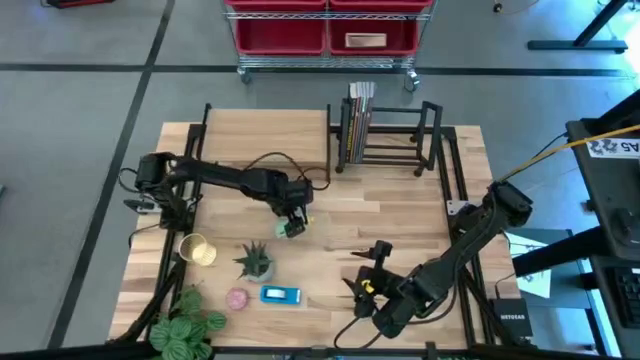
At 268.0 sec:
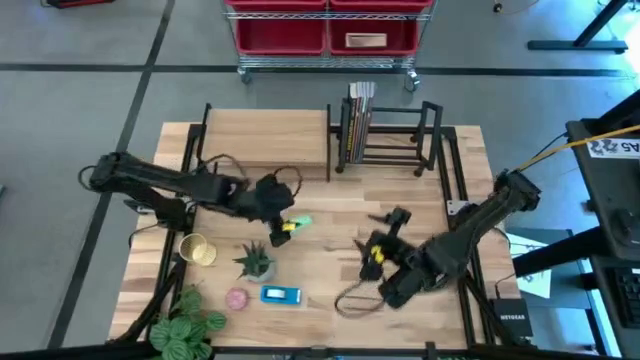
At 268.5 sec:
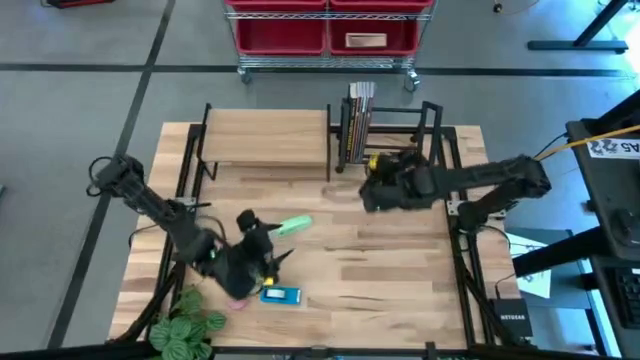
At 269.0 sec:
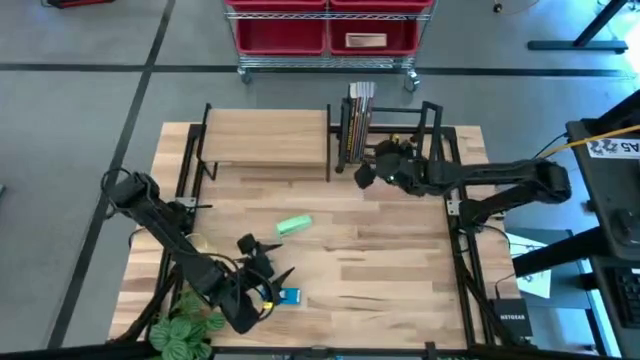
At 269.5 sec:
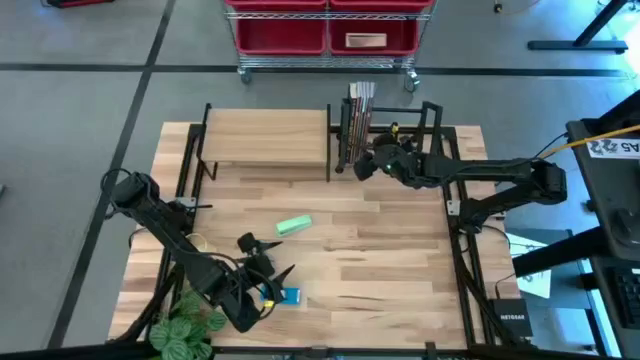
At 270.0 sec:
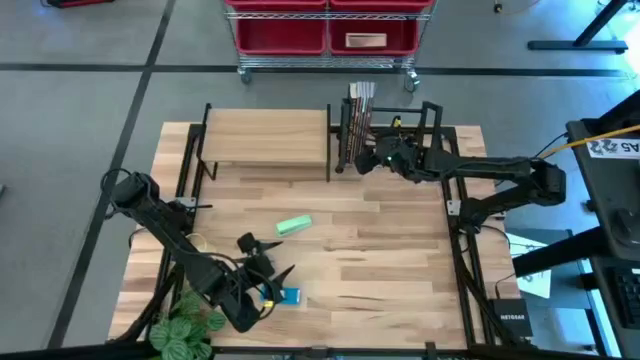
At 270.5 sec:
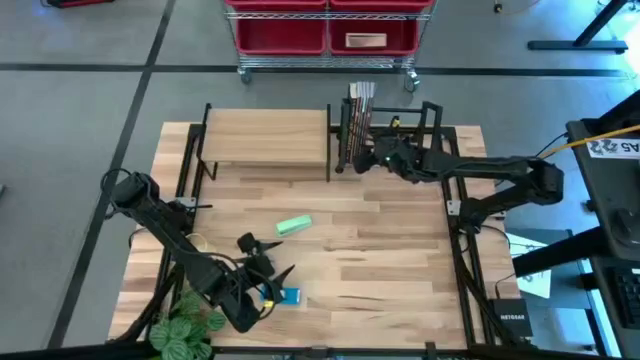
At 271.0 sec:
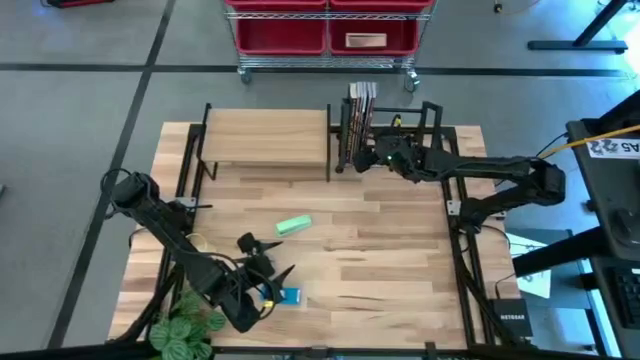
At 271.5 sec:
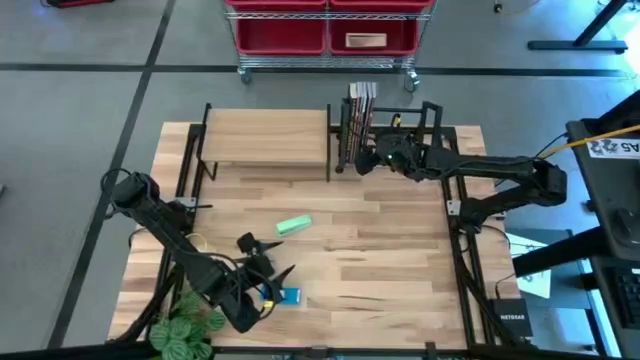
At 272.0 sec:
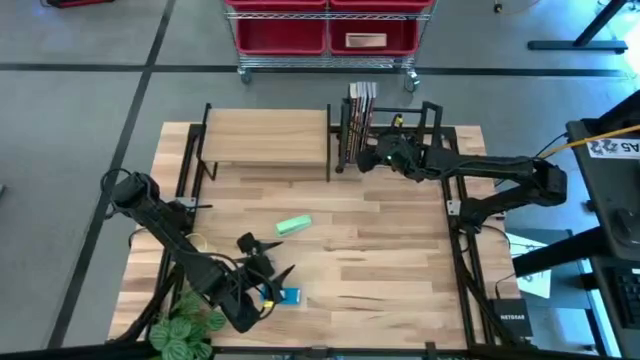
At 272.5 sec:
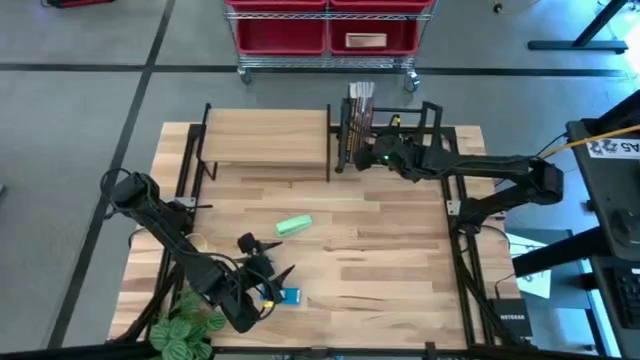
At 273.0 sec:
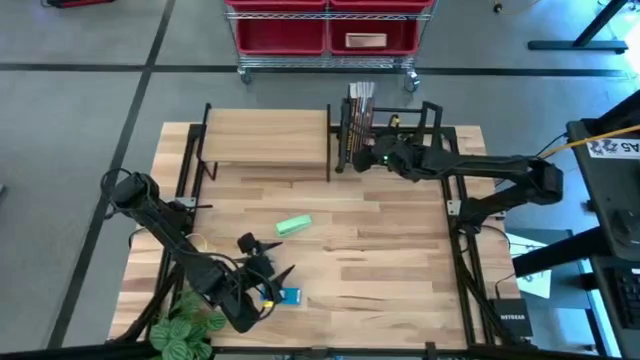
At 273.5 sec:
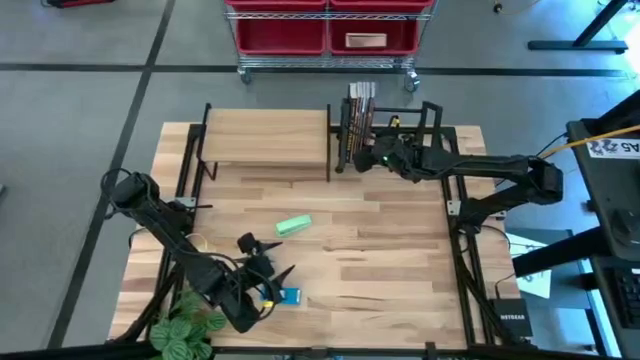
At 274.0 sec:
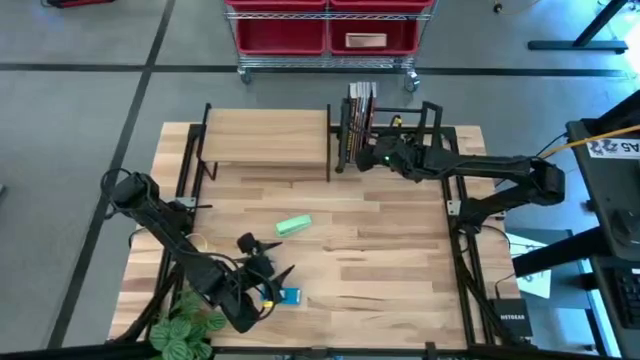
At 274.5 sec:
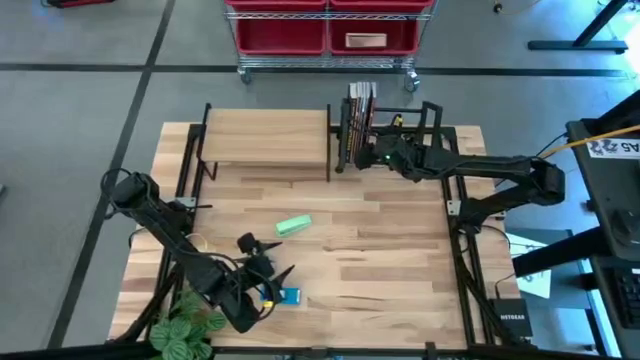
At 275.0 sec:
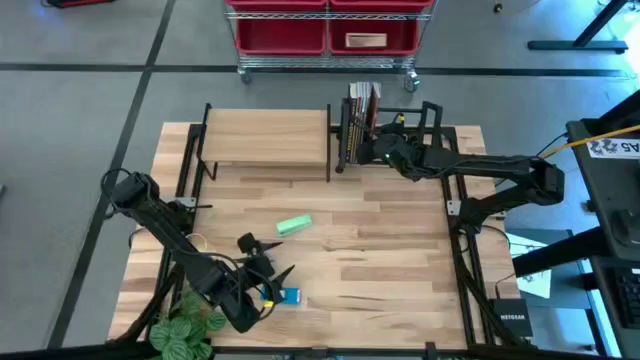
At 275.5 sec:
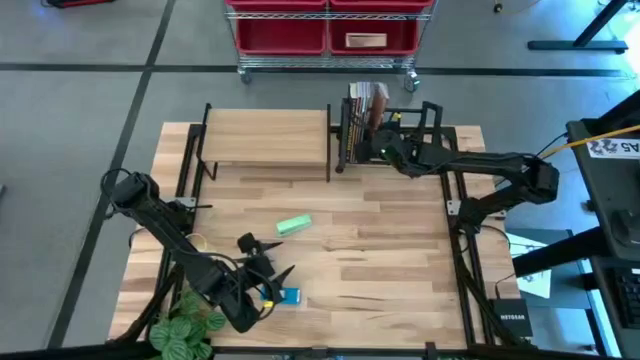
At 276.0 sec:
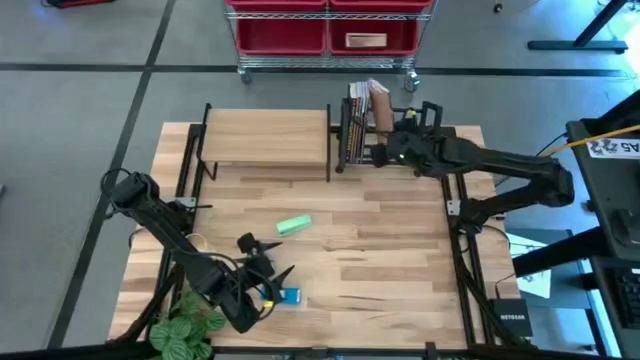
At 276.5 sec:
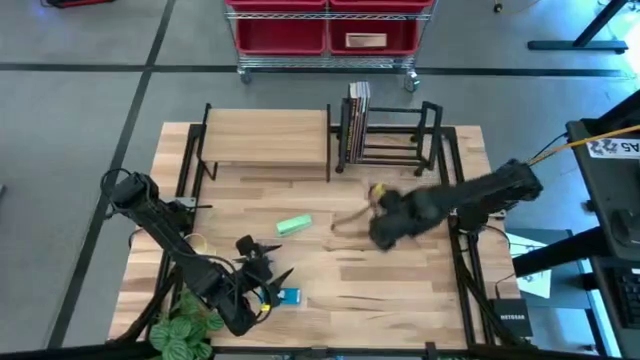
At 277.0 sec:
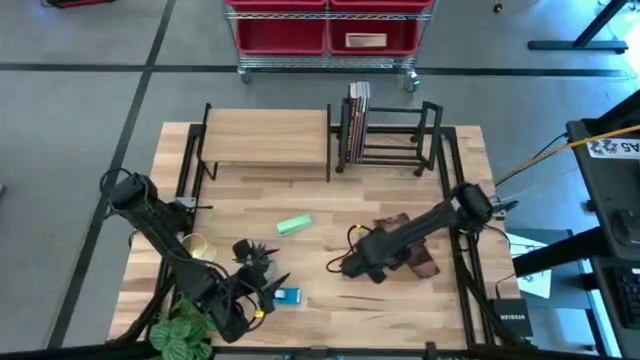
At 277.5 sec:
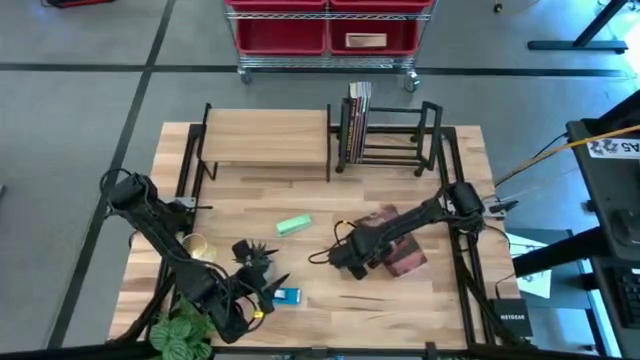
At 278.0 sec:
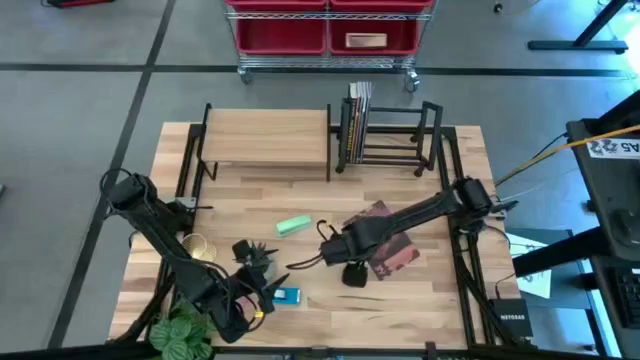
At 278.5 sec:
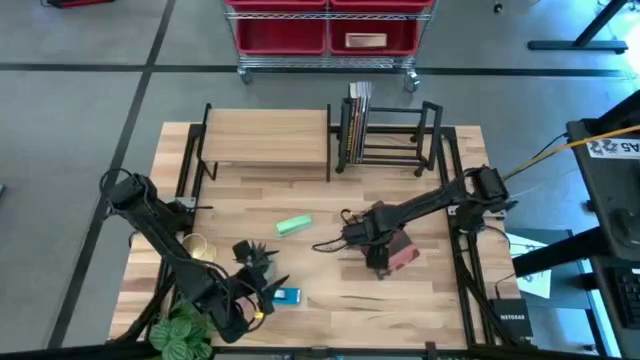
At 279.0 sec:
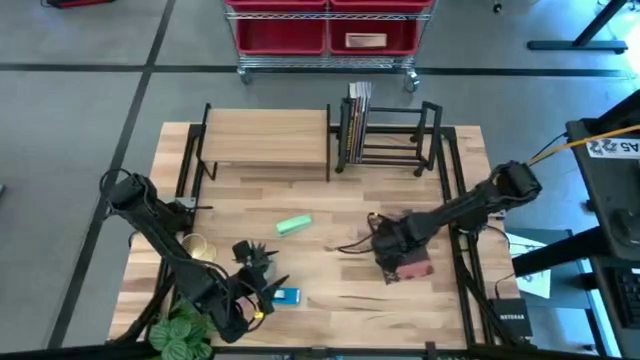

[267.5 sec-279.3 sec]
Task: Stock shelves
Remove the red purple book from the bookshelf

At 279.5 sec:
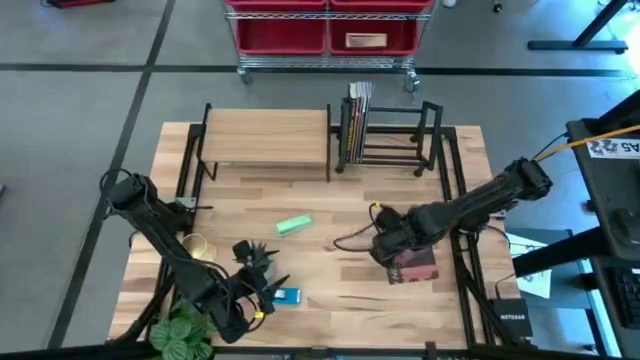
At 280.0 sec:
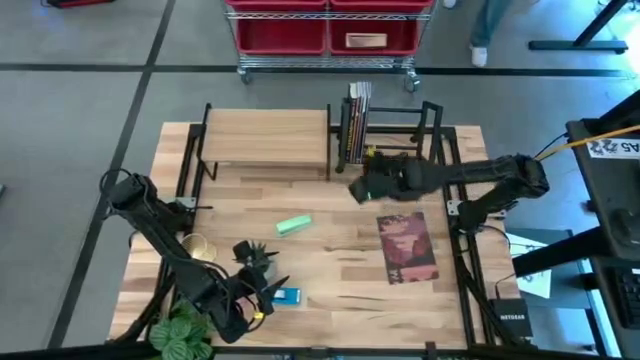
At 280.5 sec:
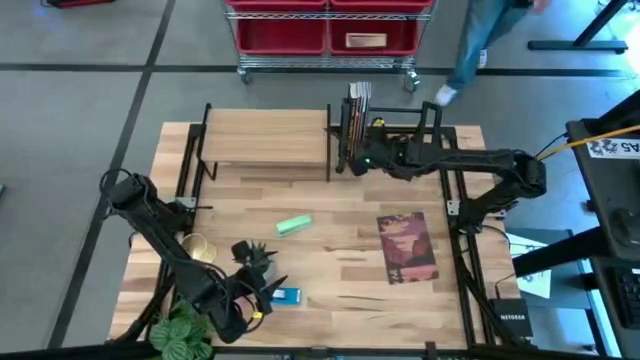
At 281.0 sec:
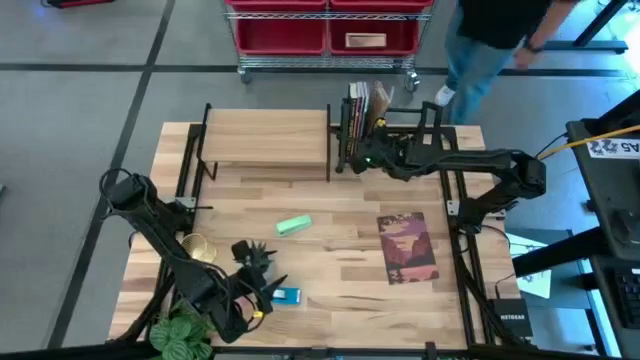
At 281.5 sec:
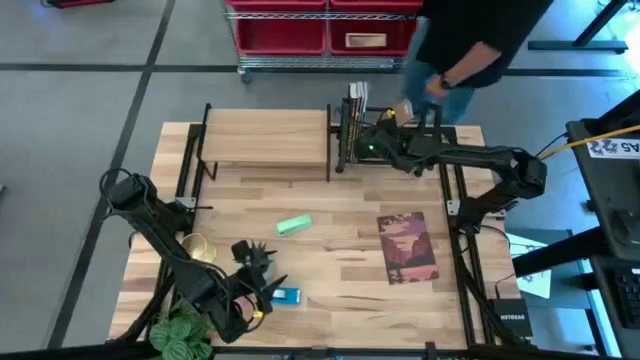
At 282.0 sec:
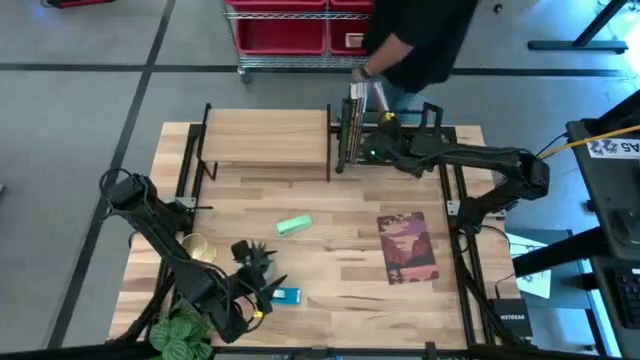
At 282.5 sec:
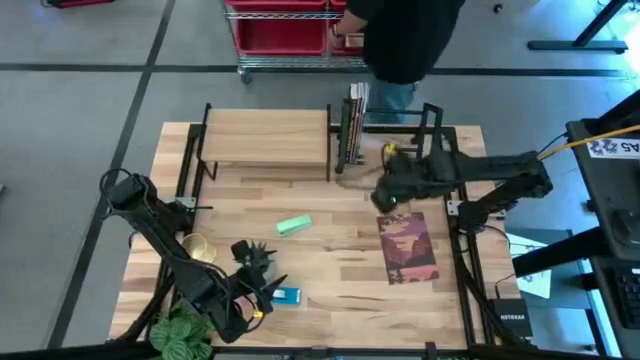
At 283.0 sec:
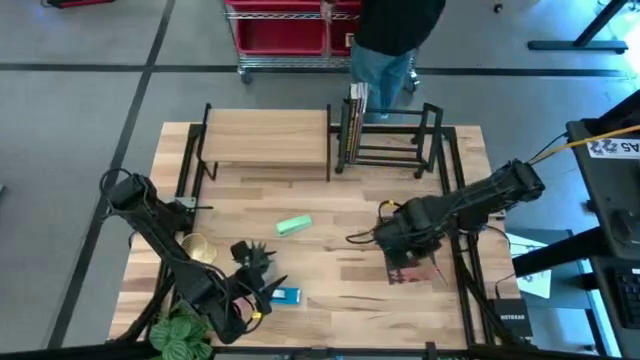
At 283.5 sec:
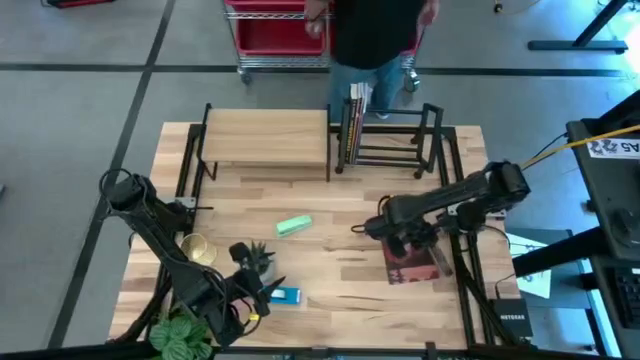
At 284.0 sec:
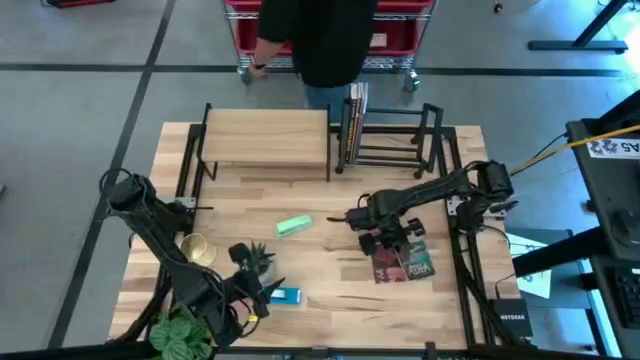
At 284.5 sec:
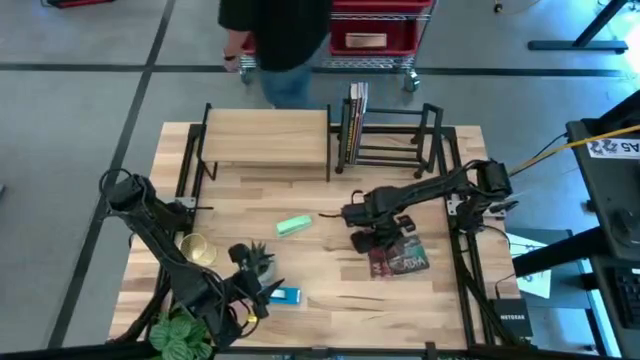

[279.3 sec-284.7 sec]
Remove the brown blue book from the bookshelf

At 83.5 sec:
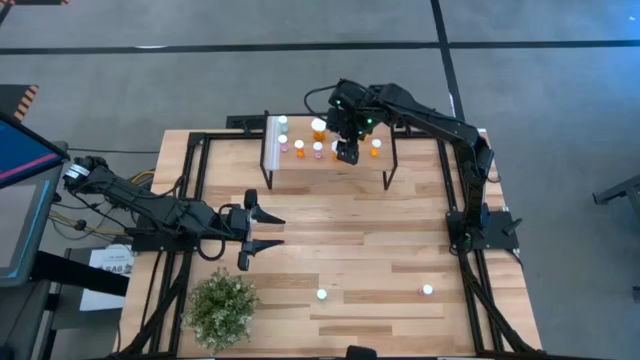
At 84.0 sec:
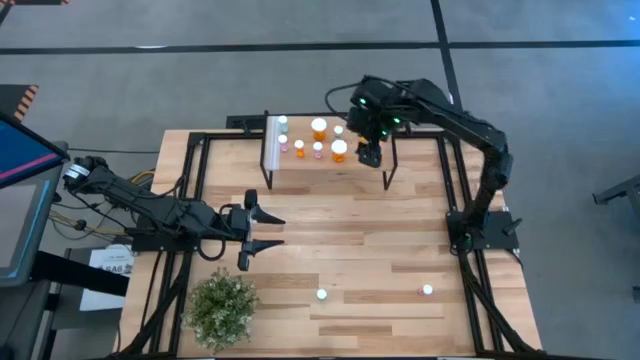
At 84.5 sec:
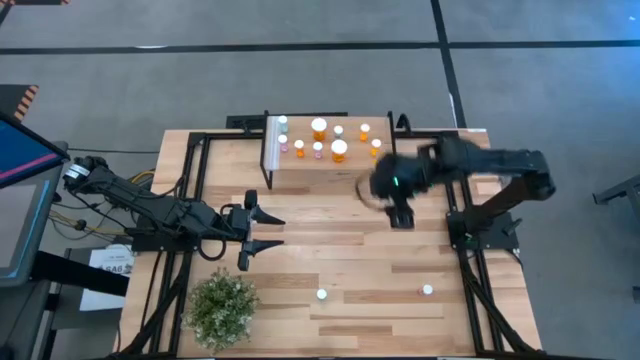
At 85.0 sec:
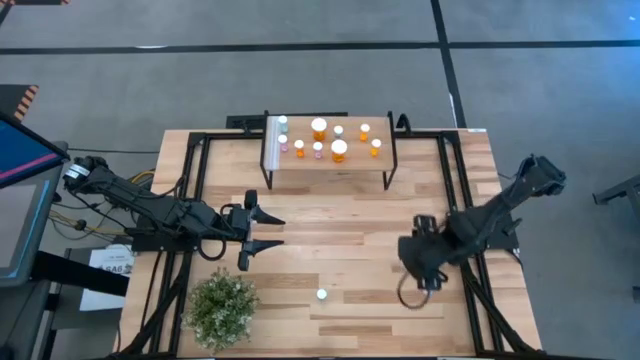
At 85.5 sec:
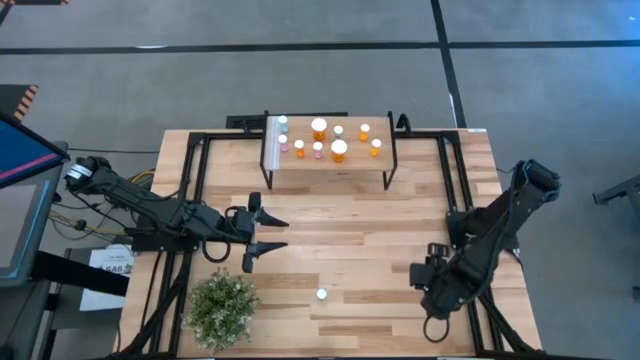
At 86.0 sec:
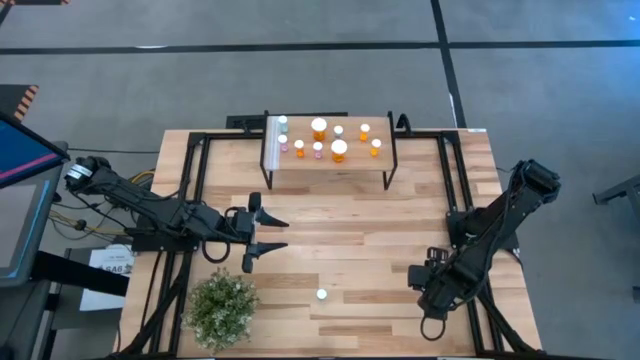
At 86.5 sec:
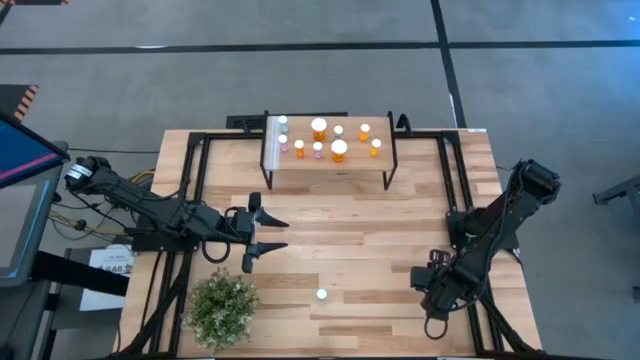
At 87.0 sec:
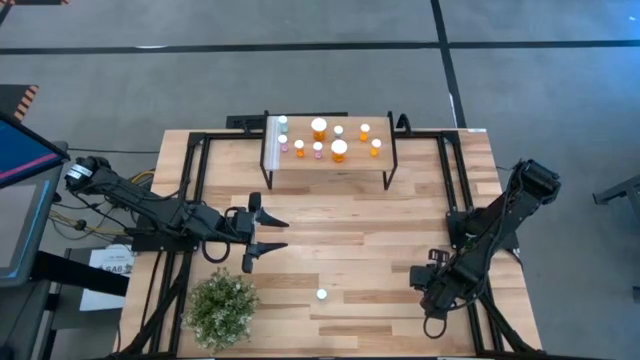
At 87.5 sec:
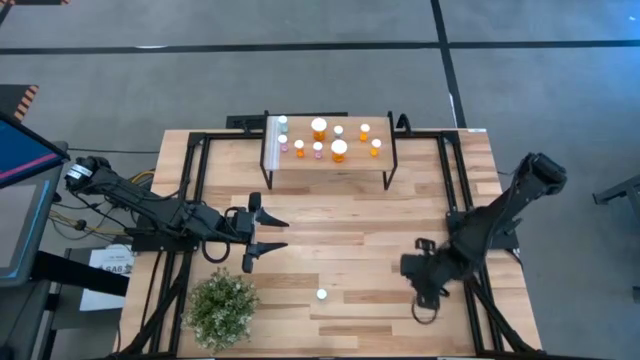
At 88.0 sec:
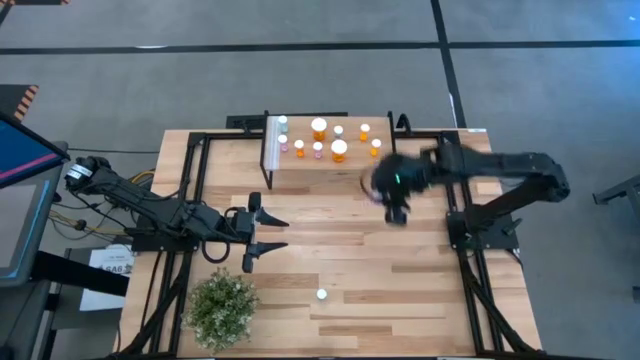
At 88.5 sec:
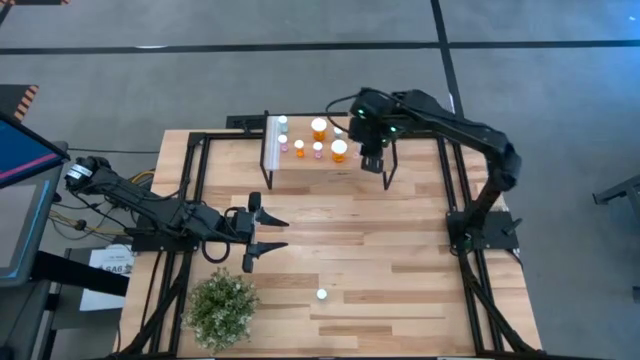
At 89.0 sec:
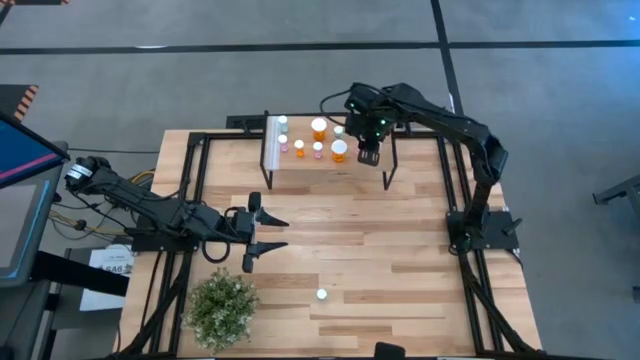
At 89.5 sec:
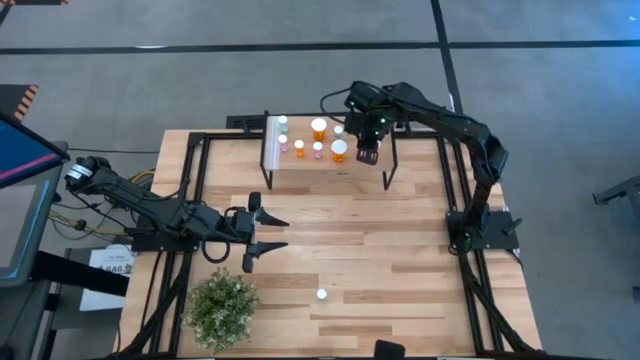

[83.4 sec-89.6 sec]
Task: Pick and place medicine bottles onto shelf by color
Put the pink pill bottle on the shelf
